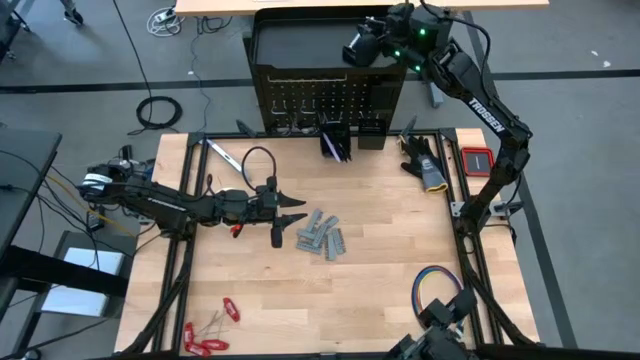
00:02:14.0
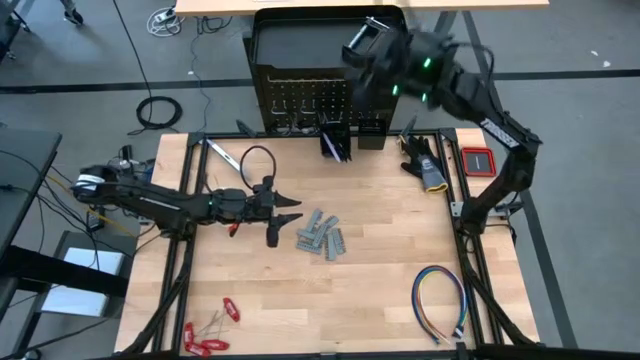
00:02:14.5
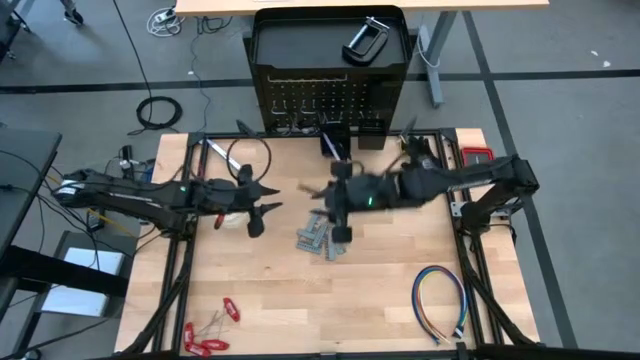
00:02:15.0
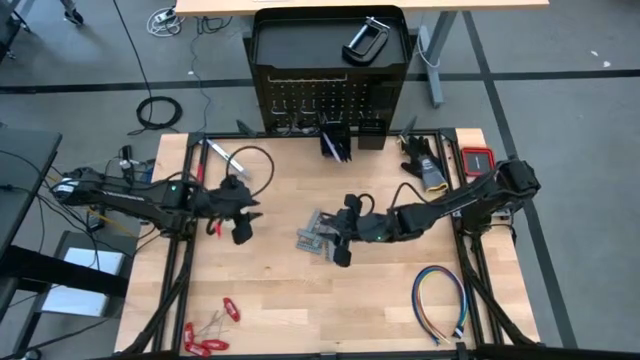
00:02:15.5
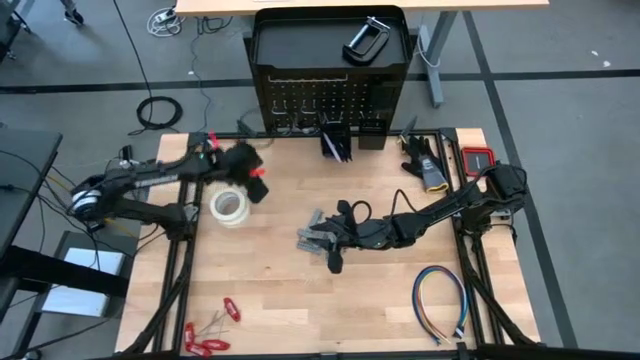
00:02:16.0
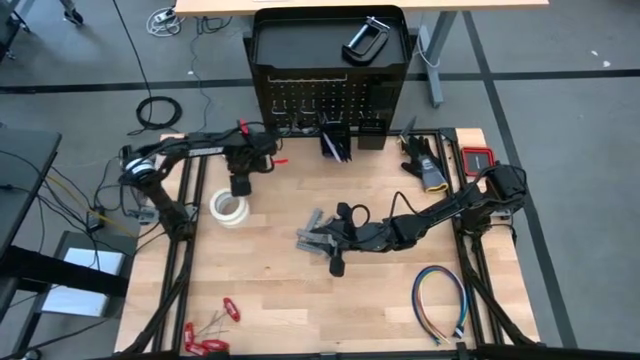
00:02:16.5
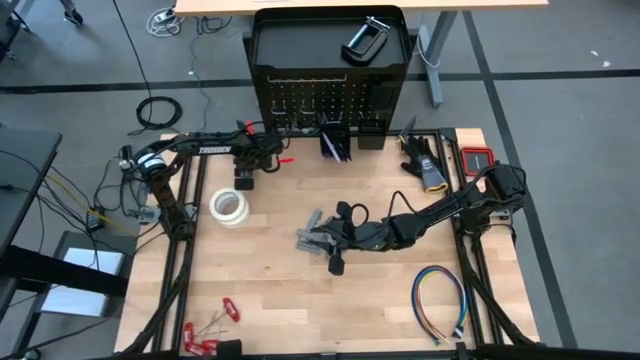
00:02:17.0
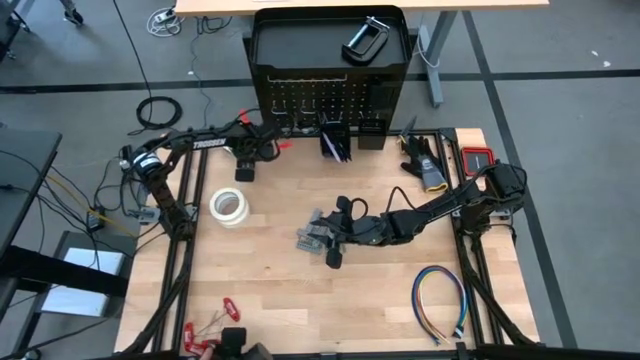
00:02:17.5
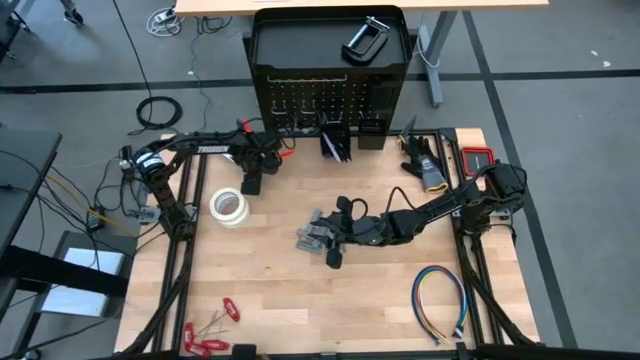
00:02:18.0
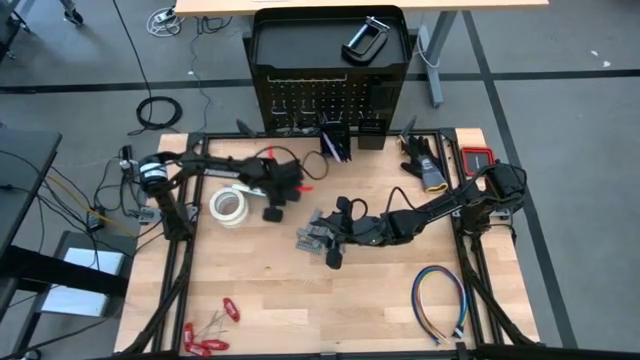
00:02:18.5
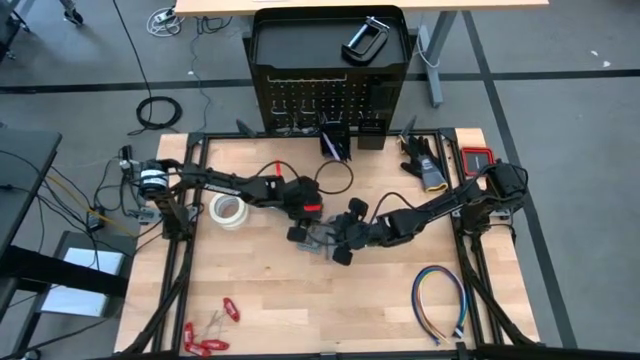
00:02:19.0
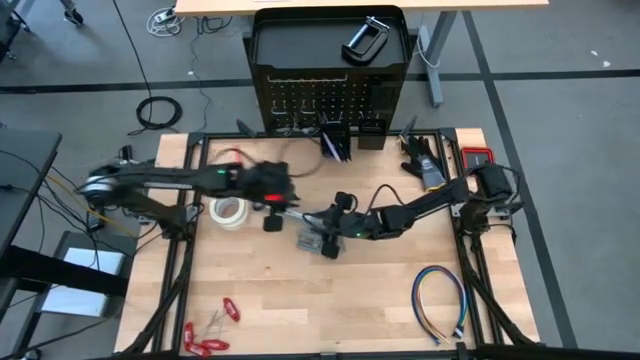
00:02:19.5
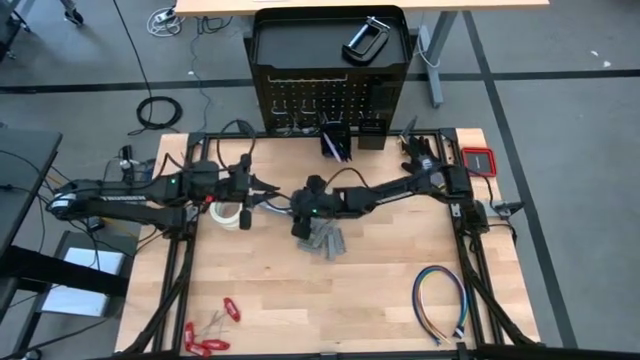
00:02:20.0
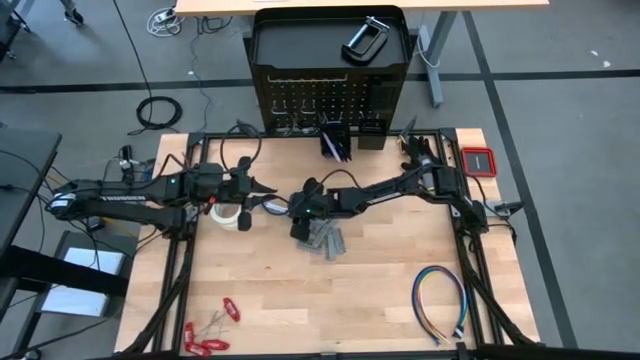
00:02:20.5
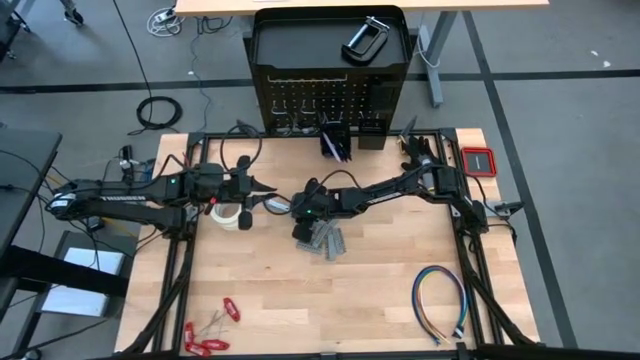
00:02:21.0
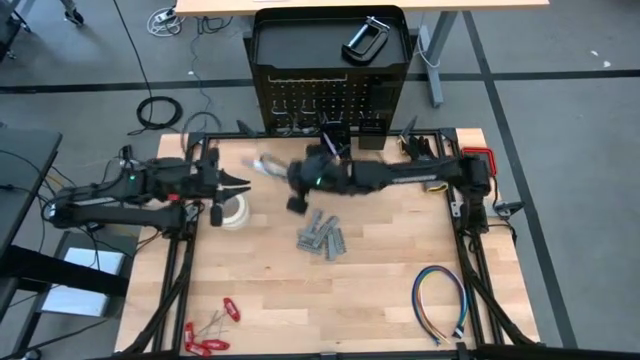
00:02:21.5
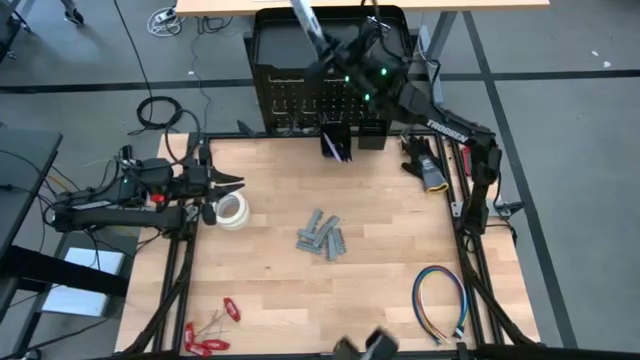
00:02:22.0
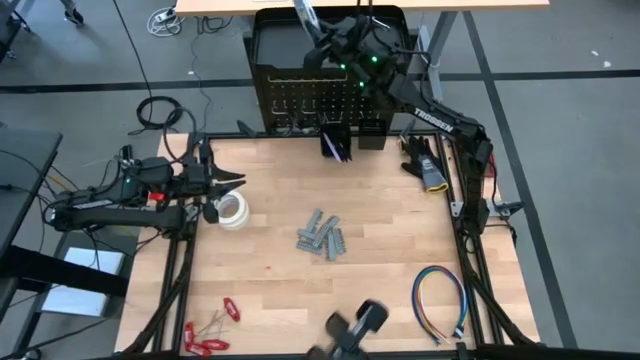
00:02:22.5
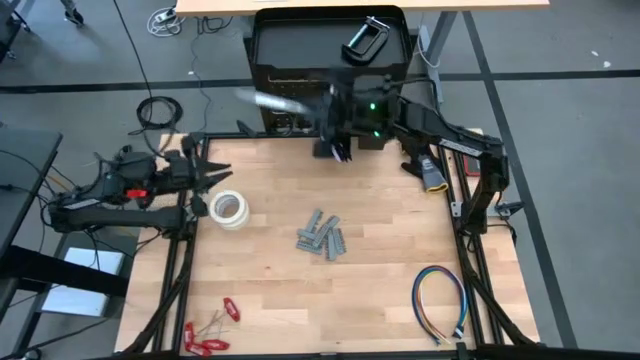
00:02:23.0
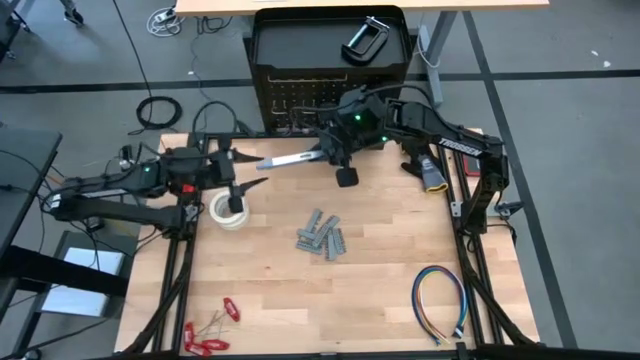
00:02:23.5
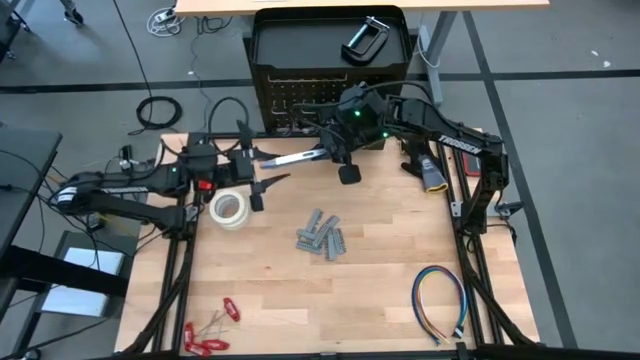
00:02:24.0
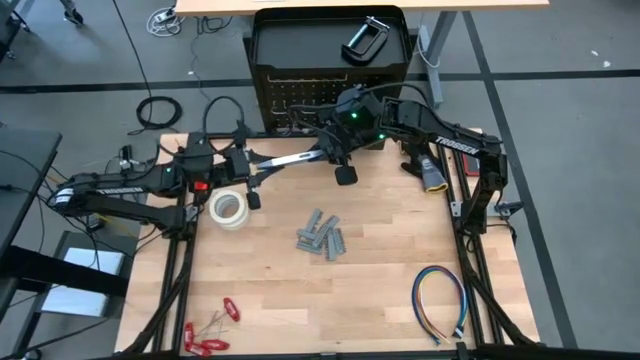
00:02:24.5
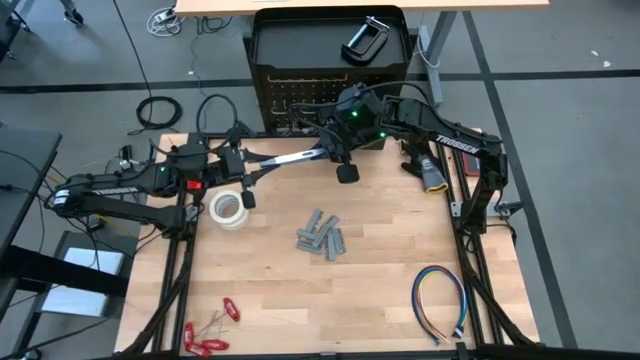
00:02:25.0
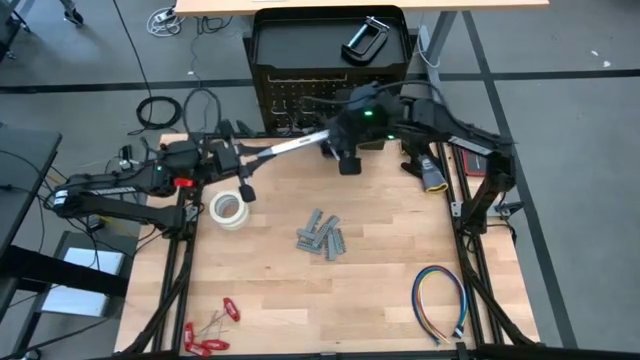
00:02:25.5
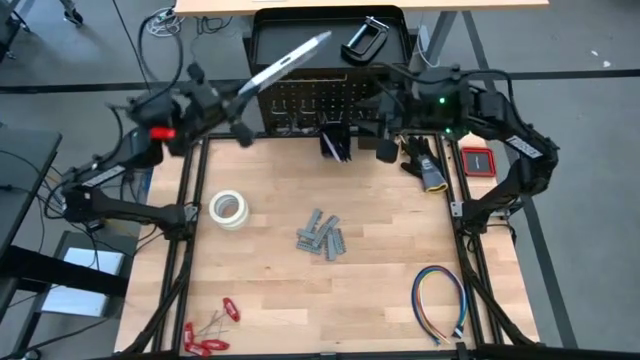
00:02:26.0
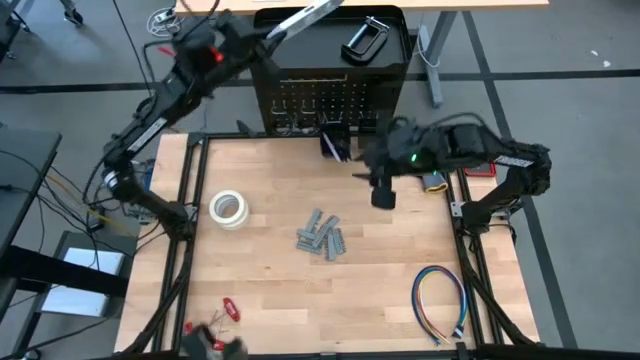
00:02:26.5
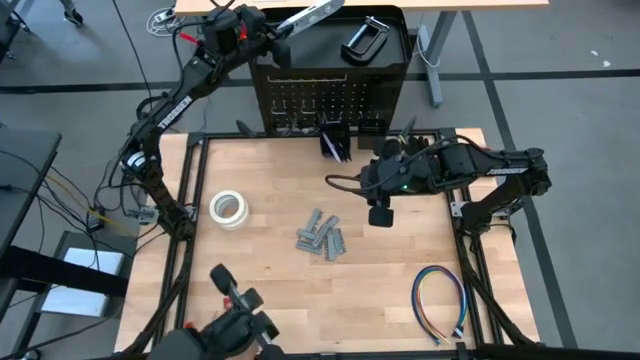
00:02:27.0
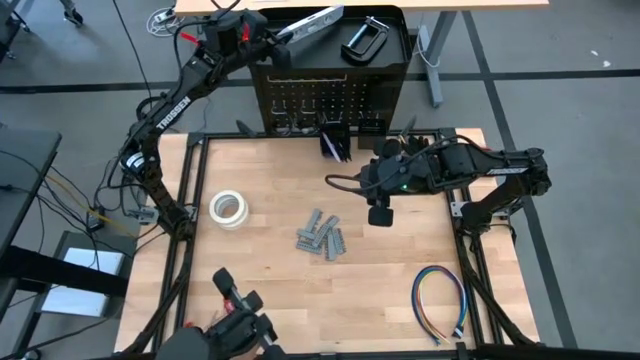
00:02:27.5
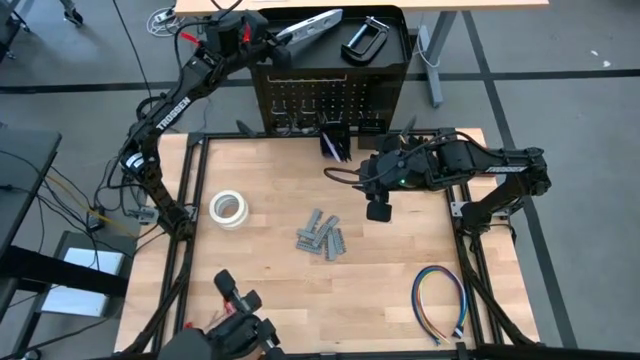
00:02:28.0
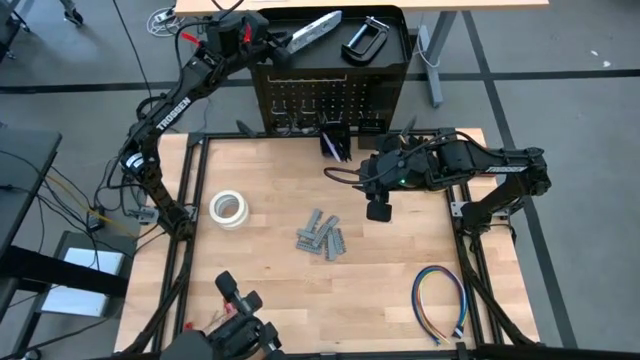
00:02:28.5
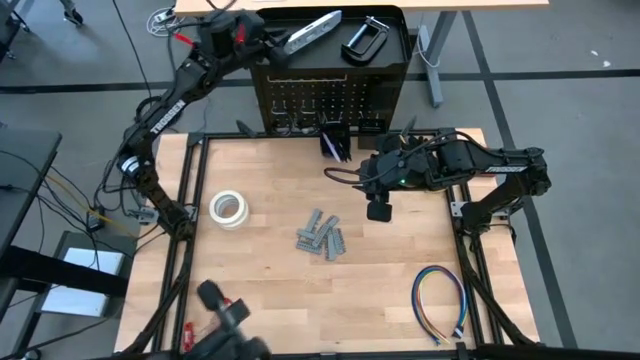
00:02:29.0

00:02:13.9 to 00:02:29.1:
Task: Hang tools onto peg board
Put the silver spirit level onto the peg board

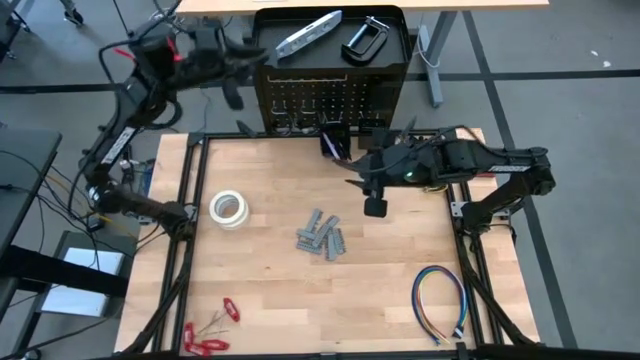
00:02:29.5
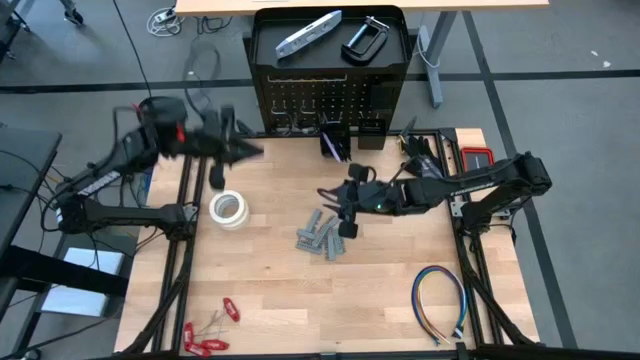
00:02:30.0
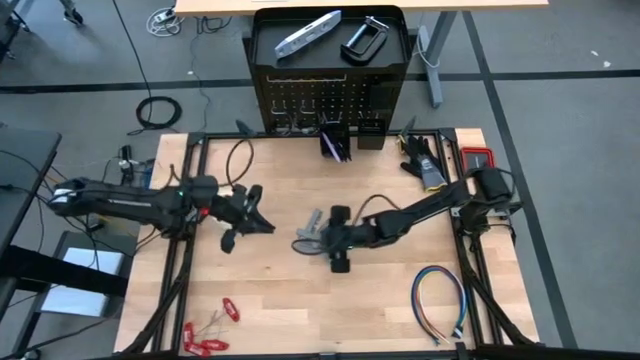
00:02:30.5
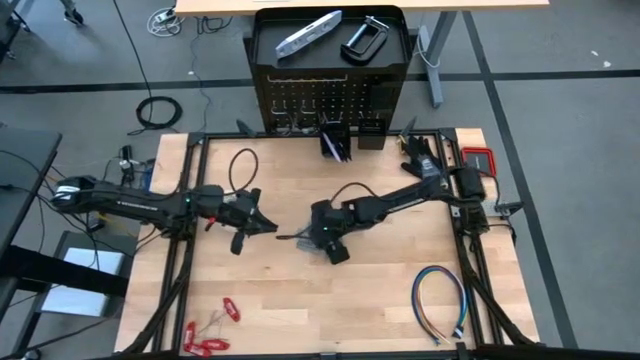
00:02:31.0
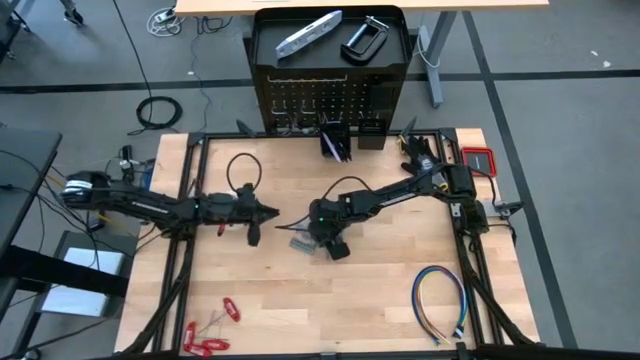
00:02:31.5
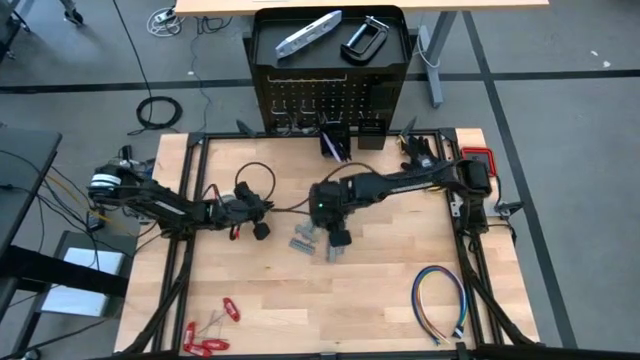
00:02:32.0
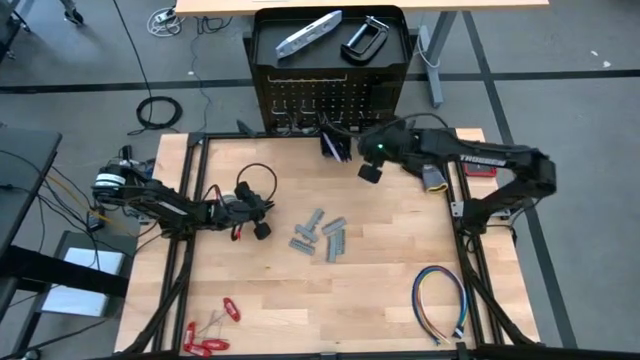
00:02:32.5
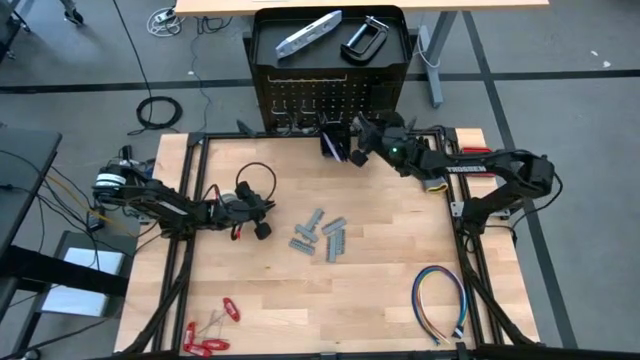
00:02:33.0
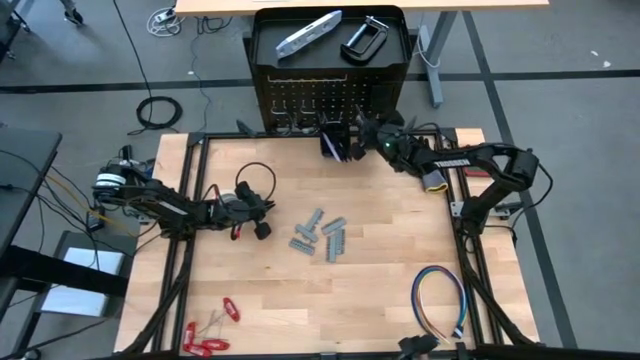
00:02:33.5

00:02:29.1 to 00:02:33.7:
Put the gray screwdriver bit set into the right black bin on the peg board

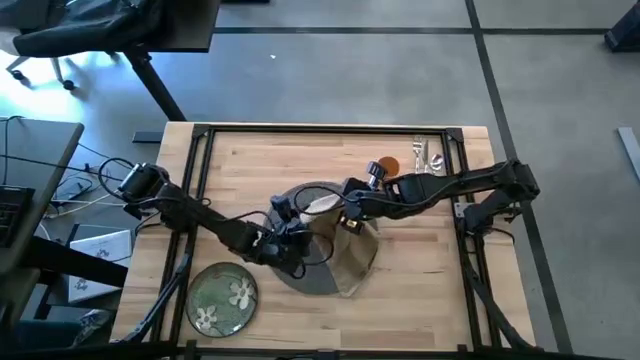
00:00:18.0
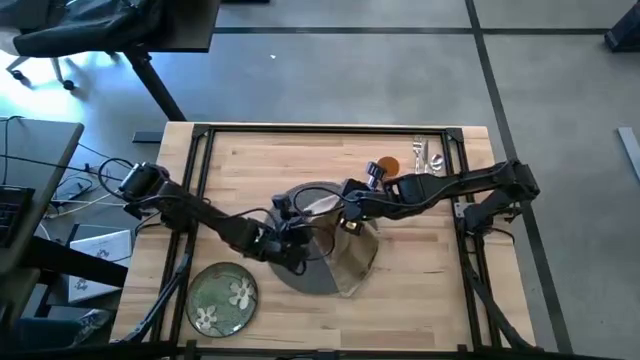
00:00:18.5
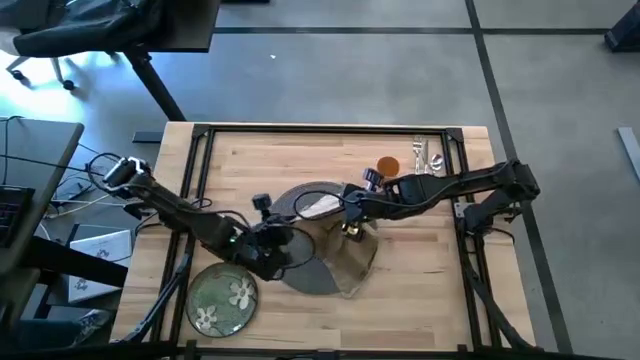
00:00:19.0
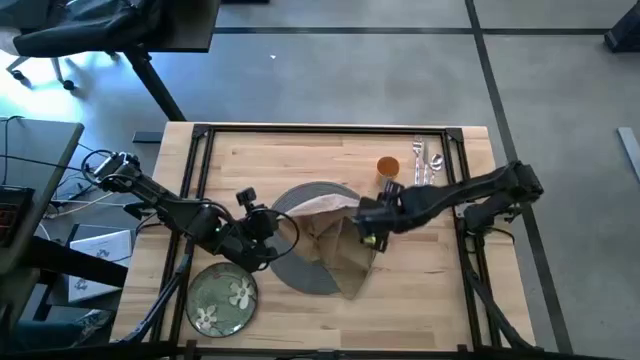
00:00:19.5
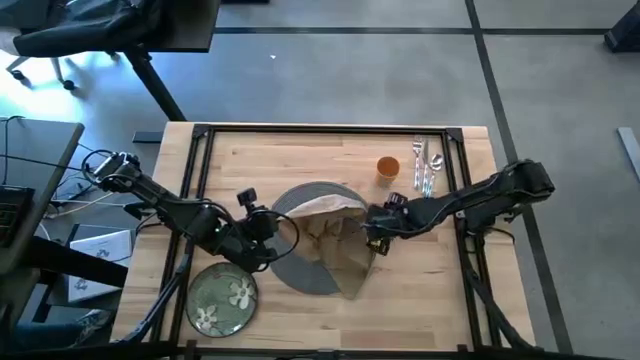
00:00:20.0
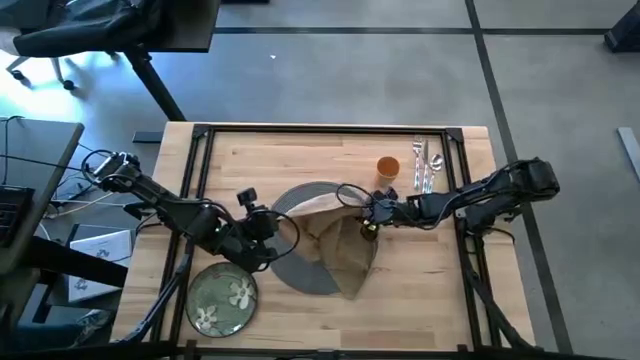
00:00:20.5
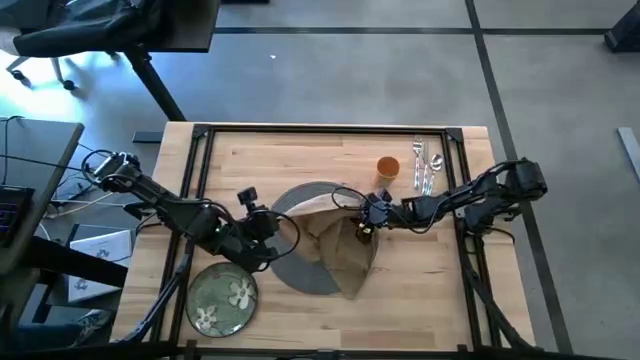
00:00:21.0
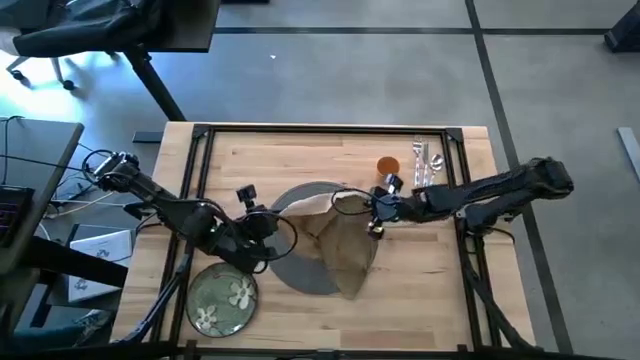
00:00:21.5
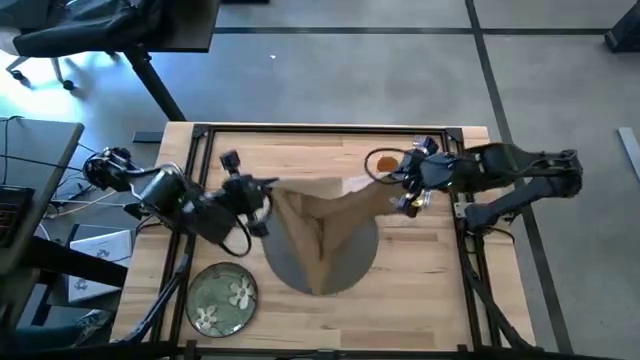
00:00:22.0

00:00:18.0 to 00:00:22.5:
Task: Set table place
Fold the brown napkin
